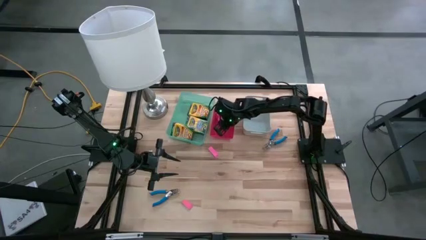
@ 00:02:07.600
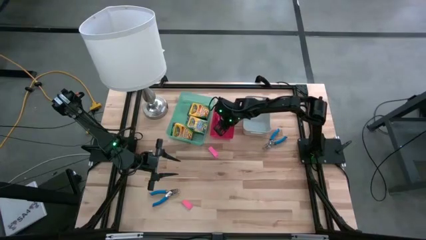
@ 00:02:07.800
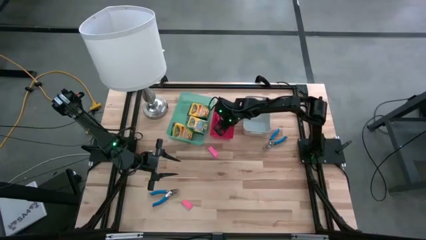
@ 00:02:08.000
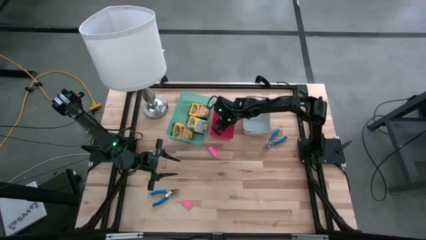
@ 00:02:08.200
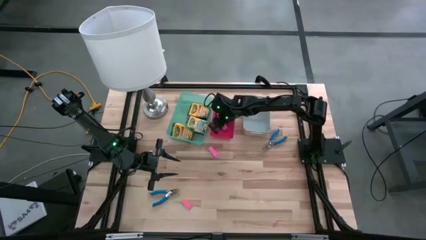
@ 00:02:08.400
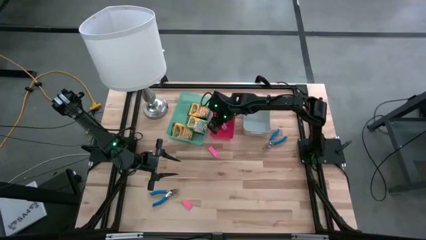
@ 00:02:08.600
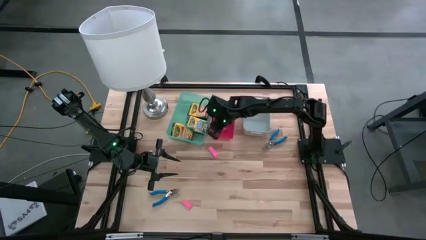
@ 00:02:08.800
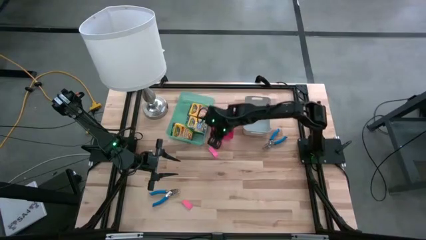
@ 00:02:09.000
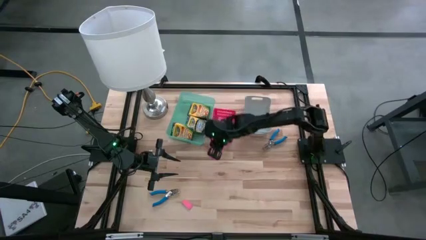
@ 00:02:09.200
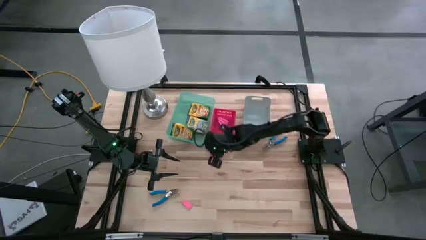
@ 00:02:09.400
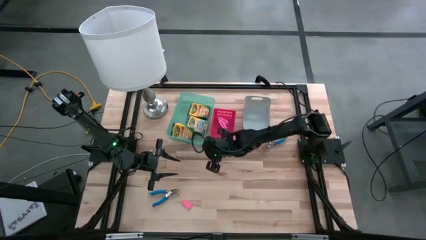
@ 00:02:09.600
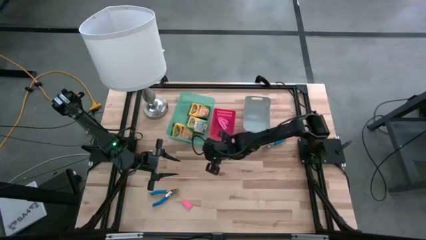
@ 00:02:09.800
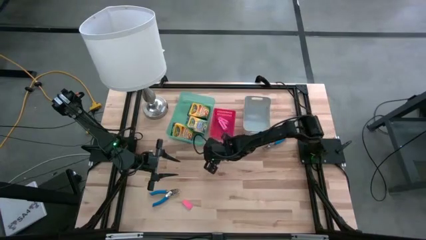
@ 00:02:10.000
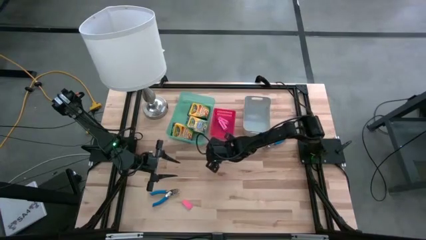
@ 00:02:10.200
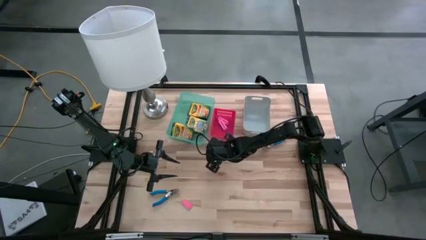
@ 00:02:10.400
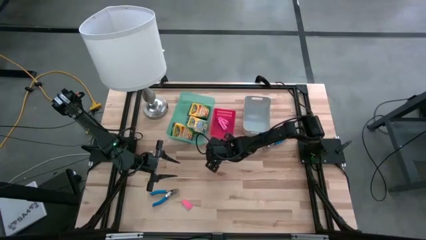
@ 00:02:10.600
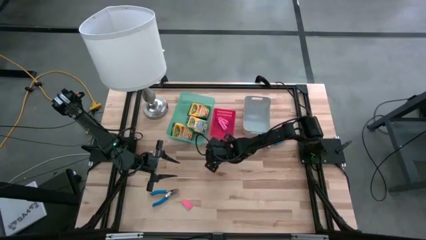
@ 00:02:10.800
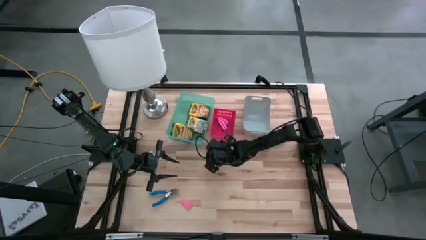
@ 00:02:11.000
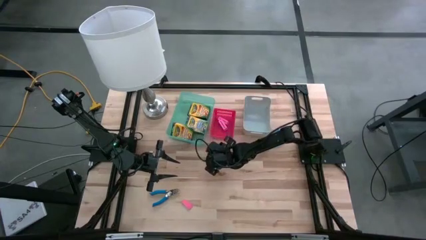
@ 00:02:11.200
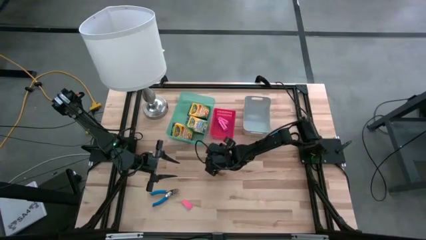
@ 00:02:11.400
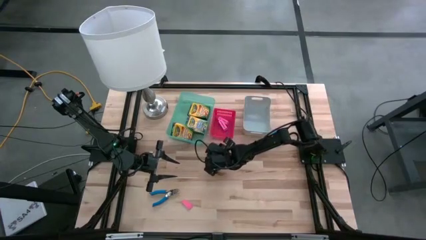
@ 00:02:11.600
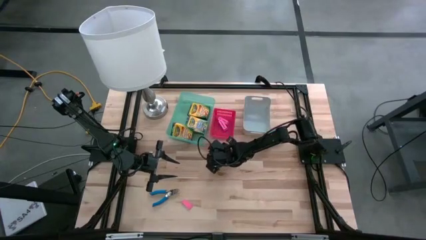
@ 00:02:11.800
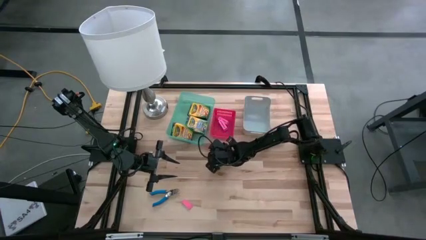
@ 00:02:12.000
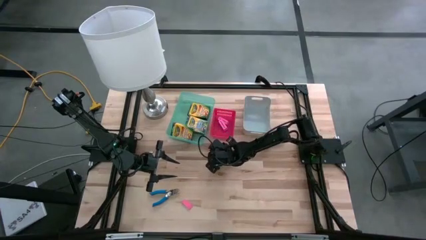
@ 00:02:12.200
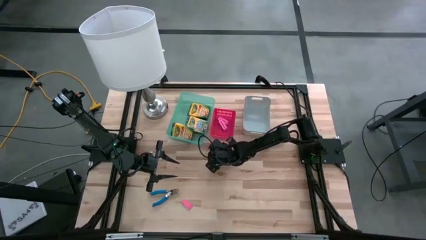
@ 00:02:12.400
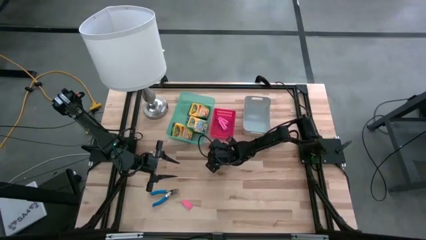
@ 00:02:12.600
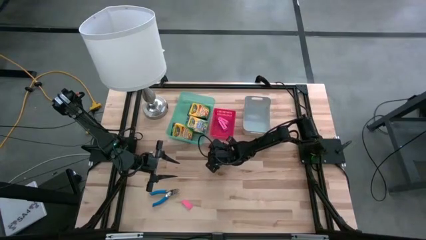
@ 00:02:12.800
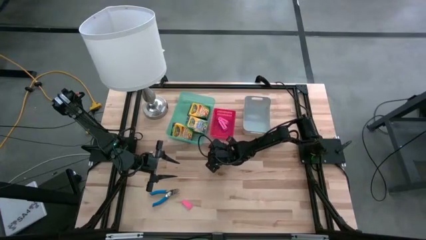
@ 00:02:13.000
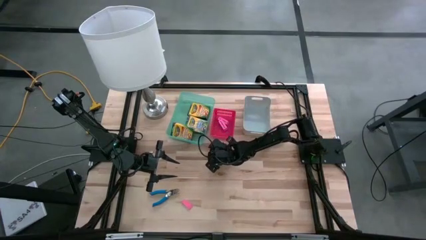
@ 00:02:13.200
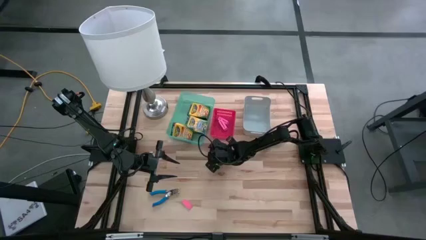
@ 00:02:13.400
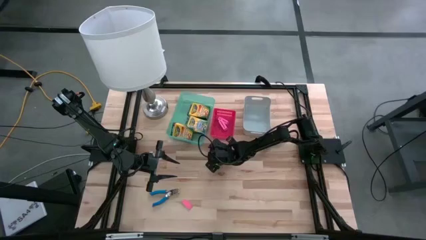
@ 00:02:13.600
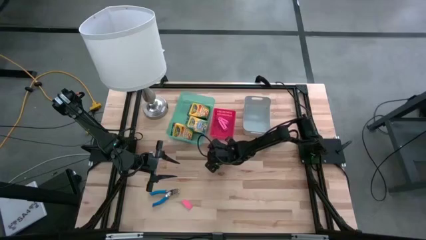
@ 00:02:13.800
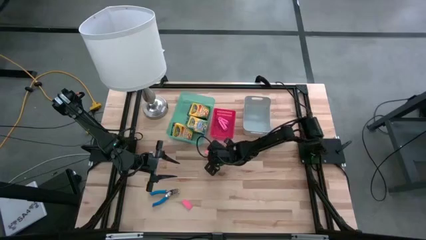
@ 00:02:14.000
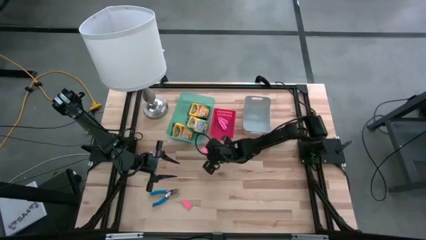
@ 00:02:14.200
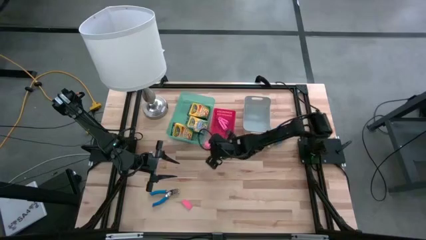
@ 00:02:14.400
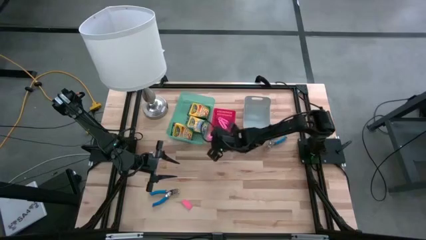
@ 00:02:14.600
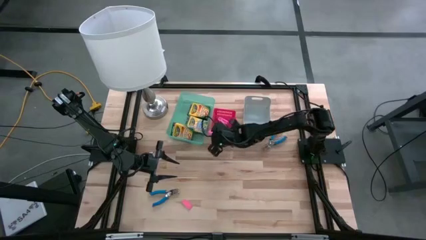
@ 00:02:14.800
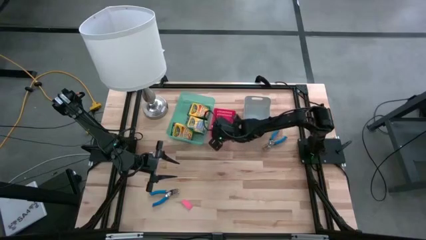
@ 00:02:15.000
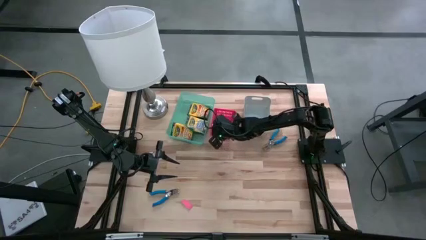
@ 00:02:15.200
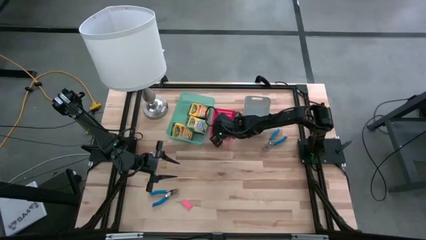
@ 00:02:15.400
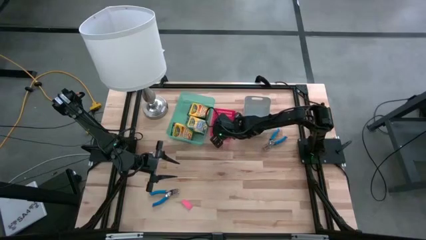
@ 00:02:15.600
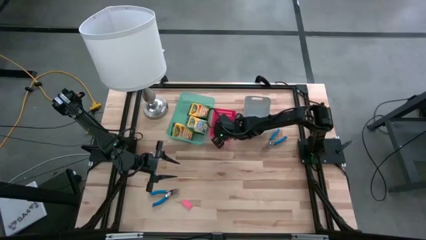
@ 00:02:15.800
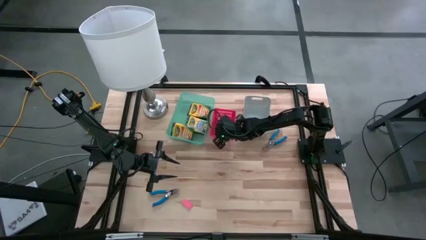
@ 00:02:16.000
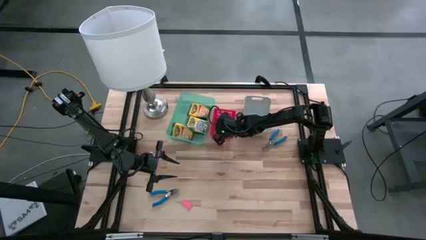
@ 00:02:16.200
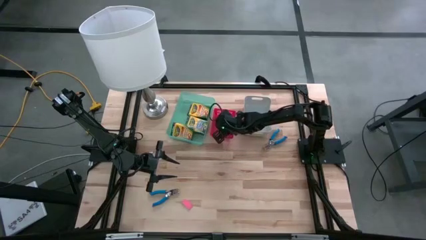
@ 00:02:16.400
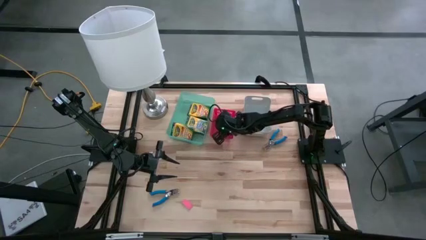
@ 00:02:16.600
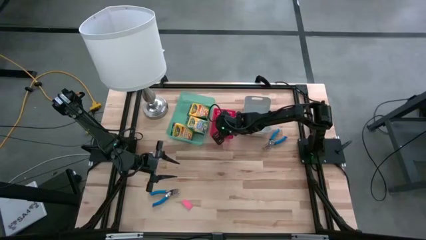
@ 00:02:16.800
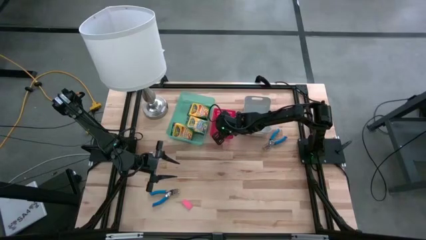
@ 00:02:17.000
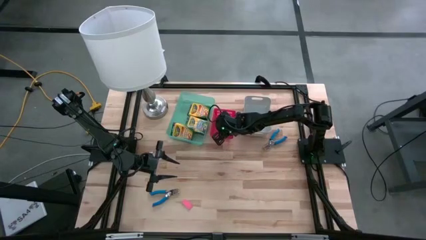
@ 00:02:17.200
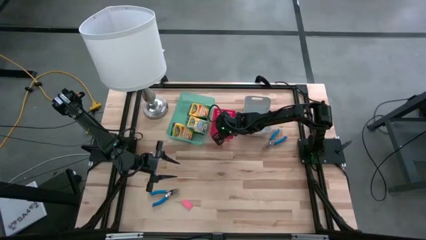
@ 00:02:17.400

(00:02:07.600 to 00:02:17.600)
Task: Pick & Place School Supplies
Put the pink eraser into the red bin

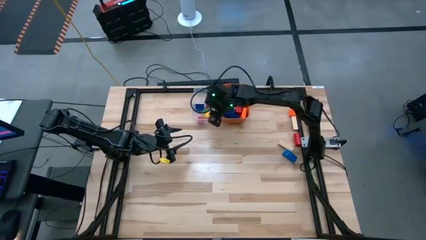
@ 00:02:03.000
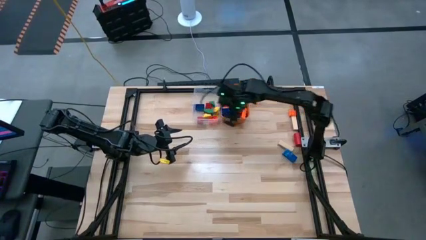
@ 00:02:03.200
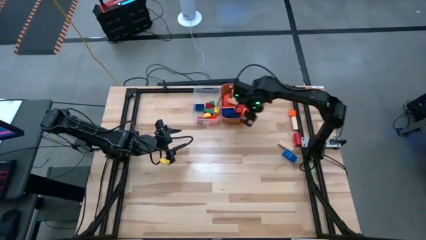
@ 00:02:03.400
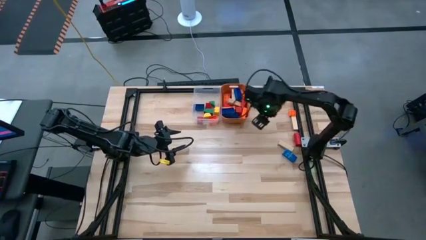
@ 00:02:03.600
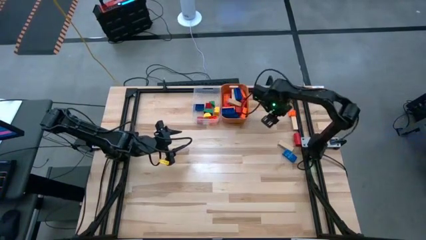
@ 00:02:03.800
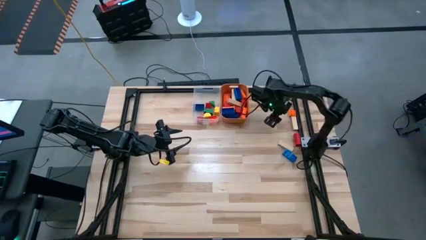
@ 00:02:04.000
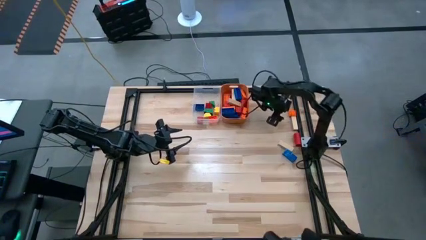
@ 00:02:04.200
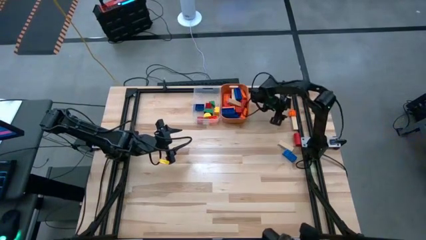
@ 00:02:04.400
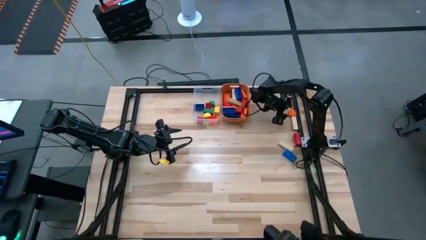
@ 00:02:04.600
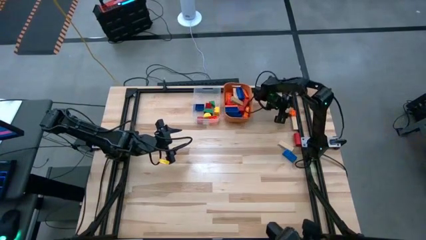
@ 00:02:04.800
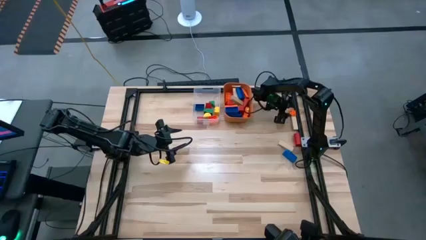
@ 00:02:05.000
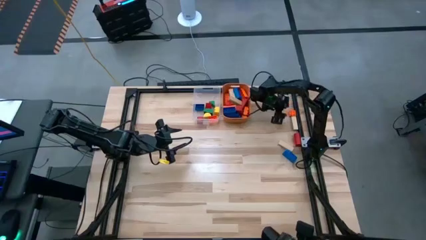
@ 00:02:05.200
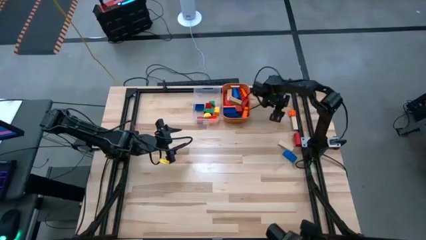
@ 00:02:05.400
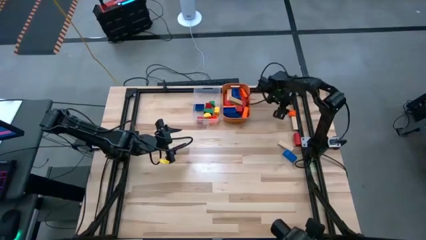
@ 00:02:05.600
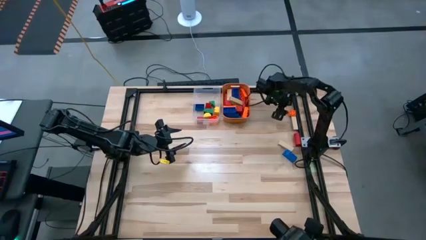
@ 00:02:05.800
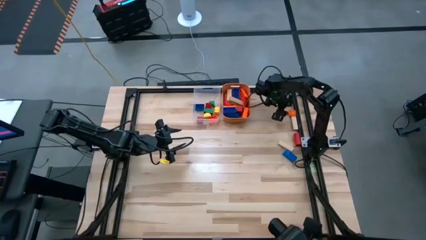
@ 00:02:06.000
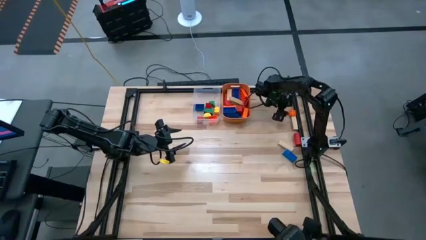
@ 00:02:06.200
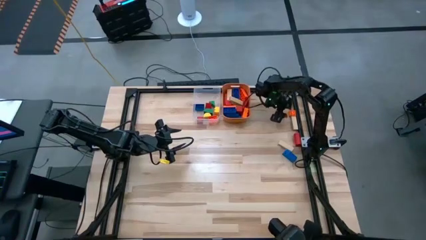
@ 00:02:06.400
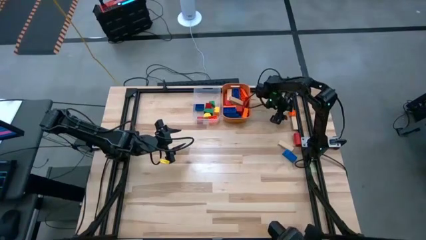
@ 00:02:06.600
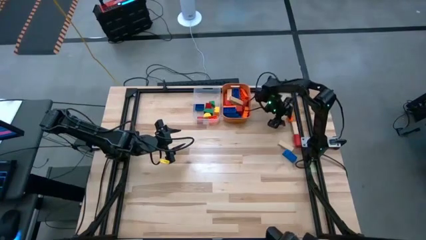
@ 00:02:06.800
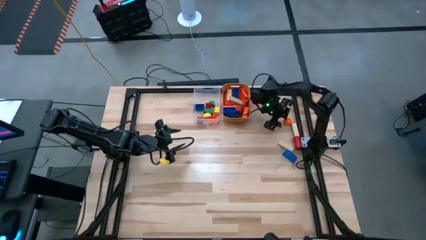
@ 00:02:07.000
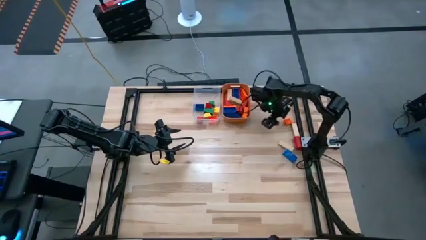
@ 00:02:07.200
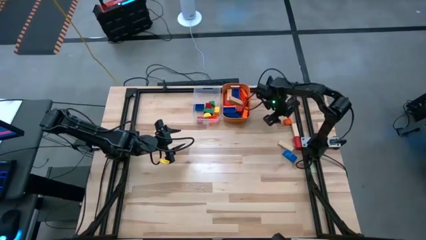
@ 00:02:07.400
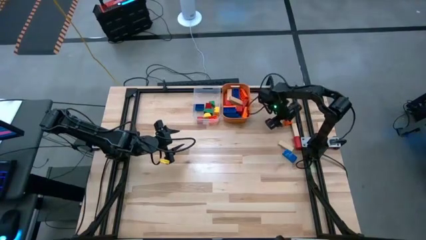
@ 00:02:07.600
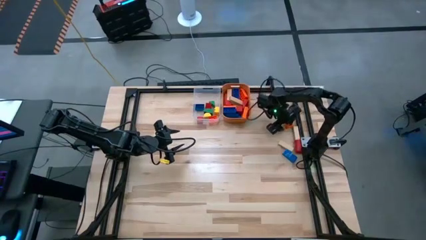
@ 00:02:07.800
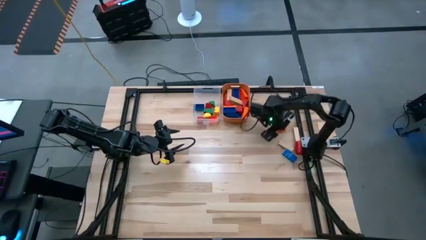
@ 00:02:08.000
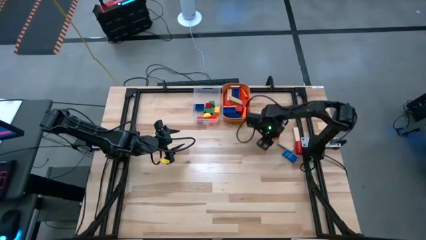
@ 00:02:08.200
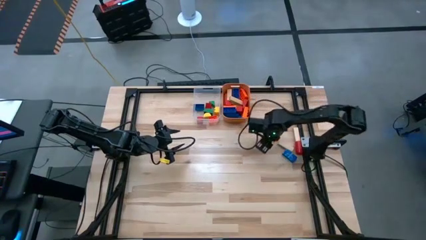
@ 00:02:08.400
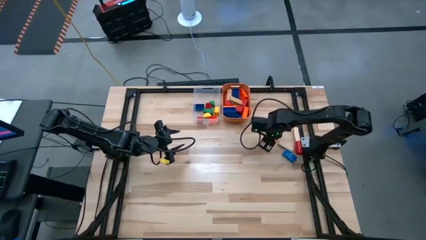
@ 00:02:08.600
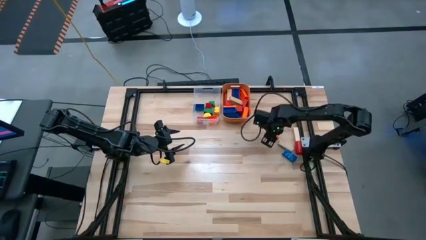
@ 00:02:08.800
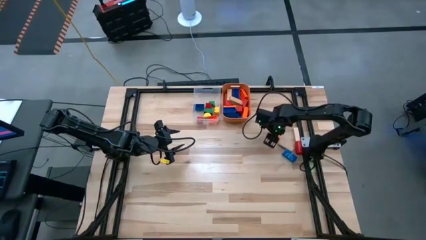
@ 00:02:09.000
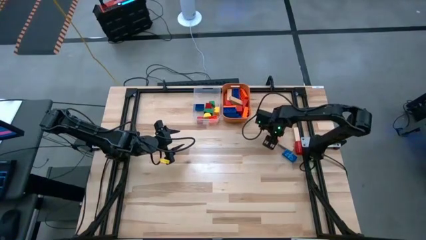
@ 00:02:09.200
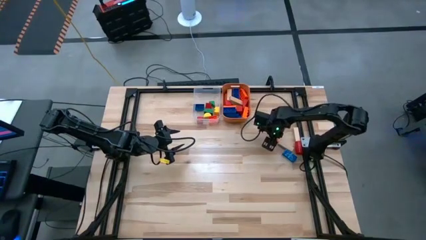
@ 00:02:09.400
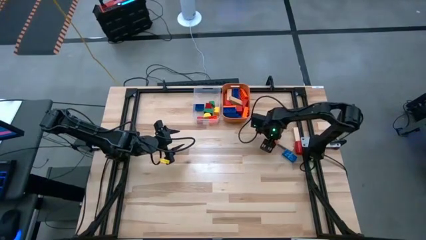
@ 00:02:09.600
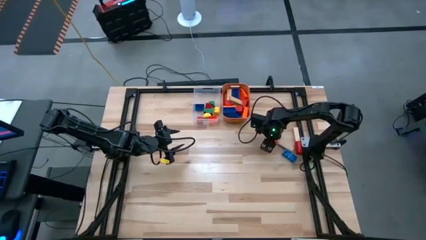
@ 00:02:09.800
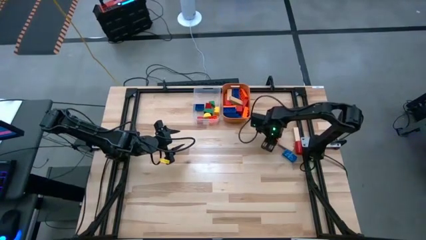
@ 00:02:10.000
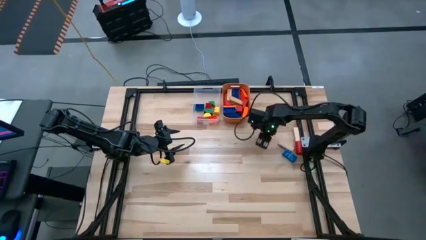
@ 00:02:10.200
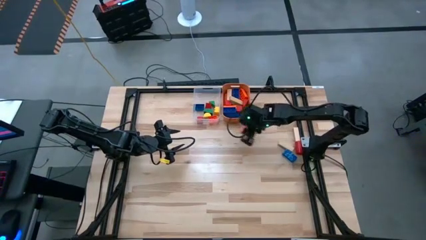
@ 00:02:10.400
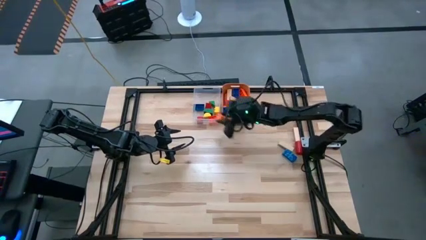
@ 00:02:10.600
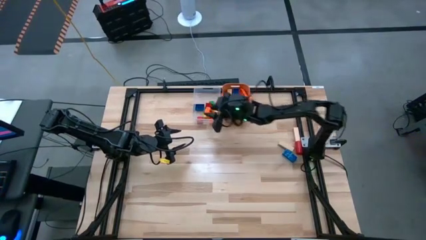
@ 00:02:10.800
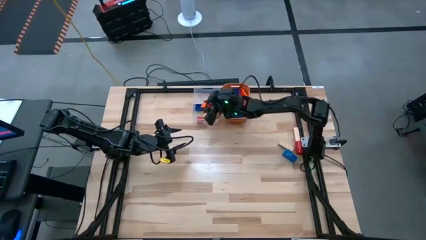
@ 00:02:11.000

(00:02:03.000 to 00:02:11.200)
Task: Sort blocks by size
Put the orange square game piece into the clear bin
